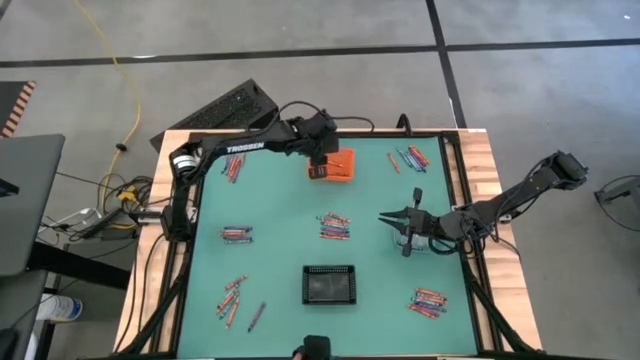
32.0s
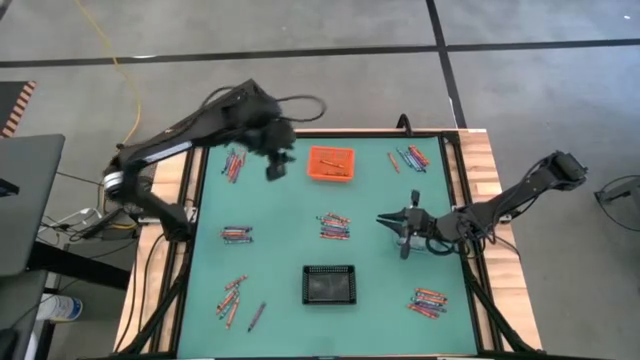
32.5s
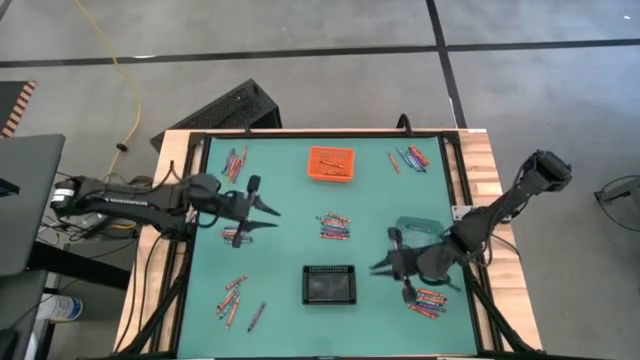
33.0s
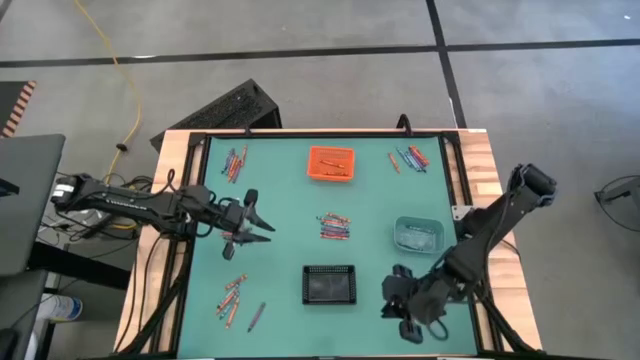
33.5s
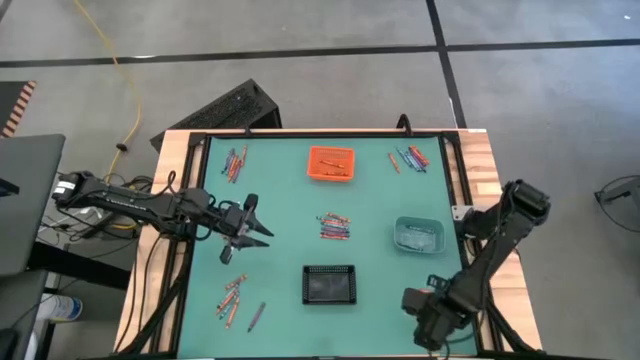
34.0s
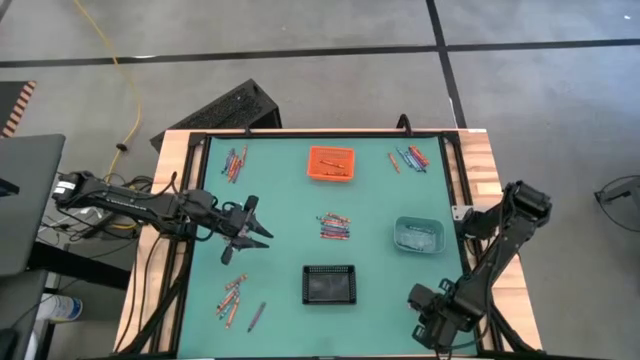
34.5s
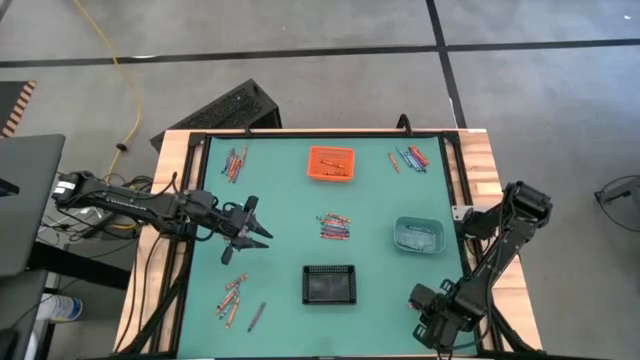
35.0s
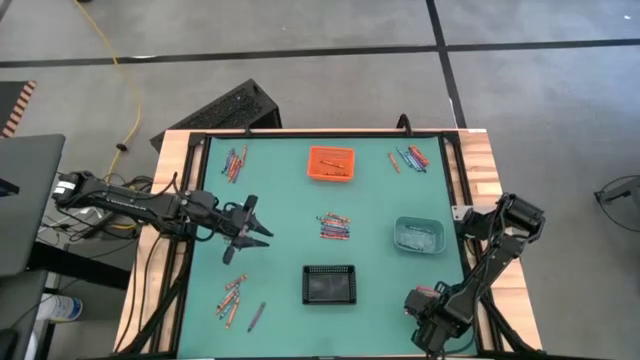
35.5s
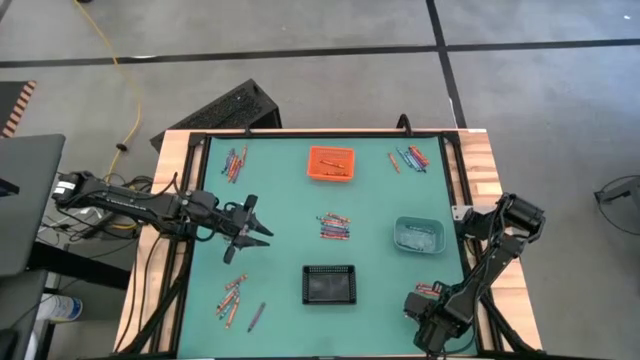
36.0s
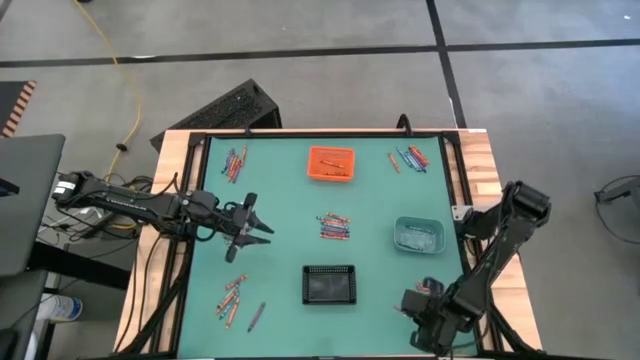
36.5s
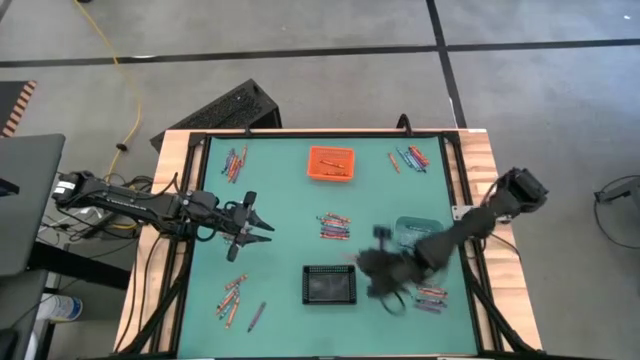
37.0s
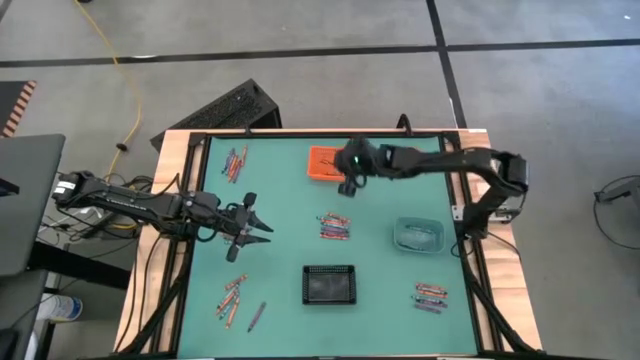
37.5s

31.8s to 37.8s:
Task: Sort crayons
Put the orange crayon into the orange bin

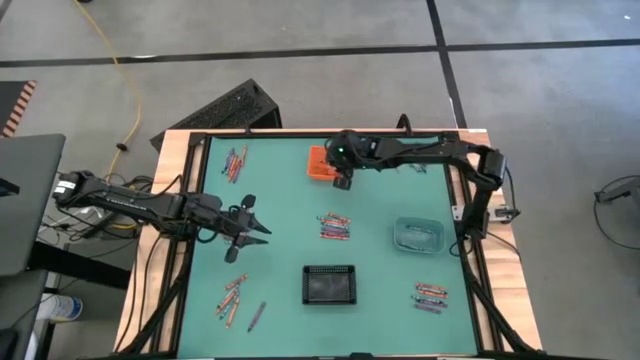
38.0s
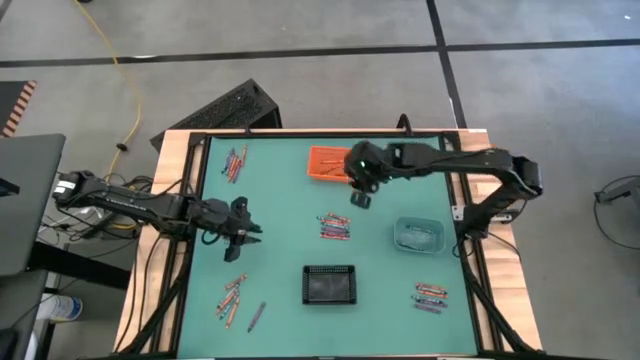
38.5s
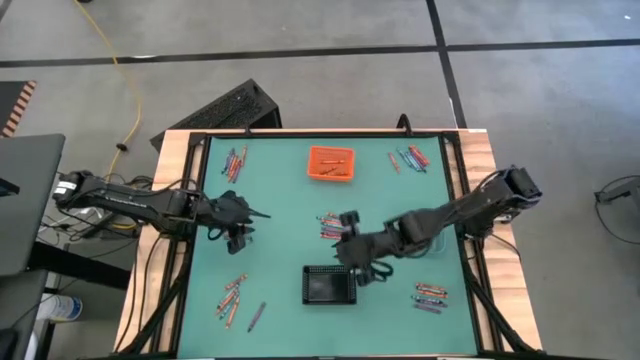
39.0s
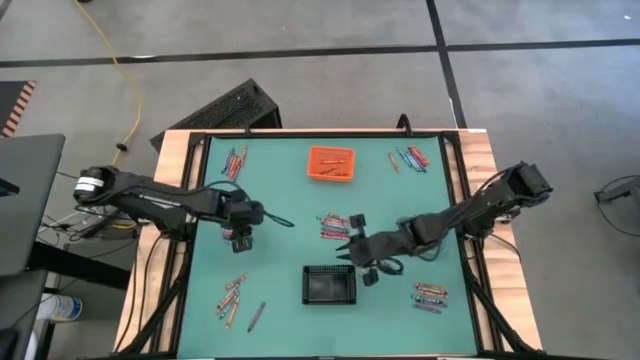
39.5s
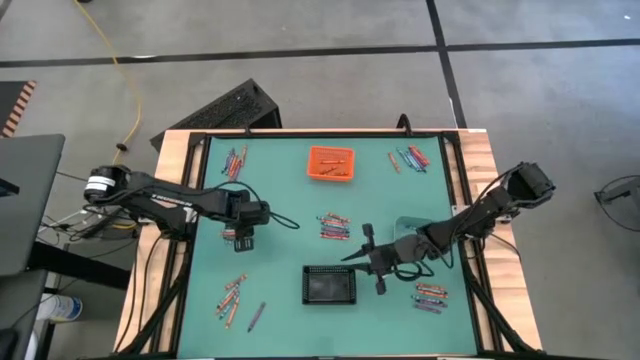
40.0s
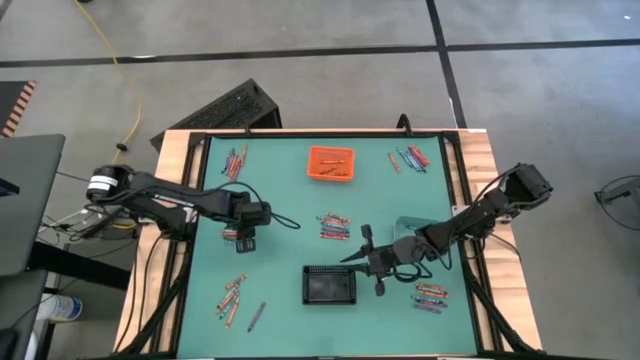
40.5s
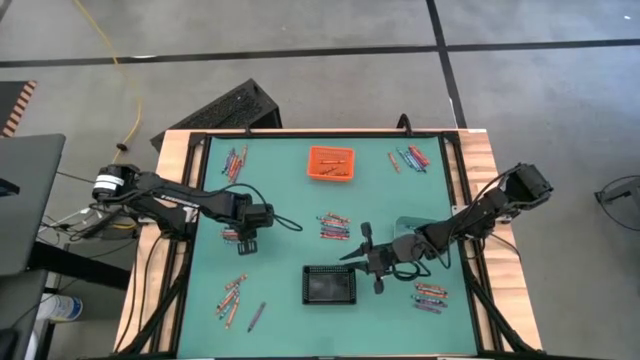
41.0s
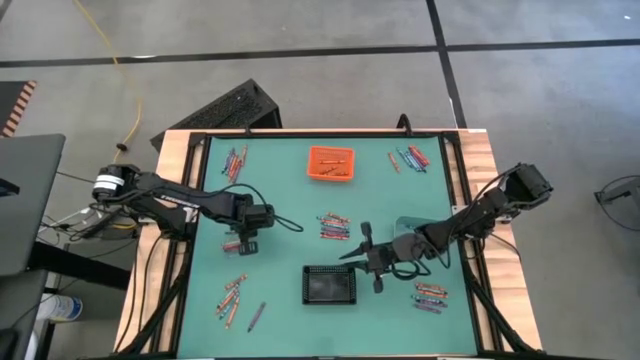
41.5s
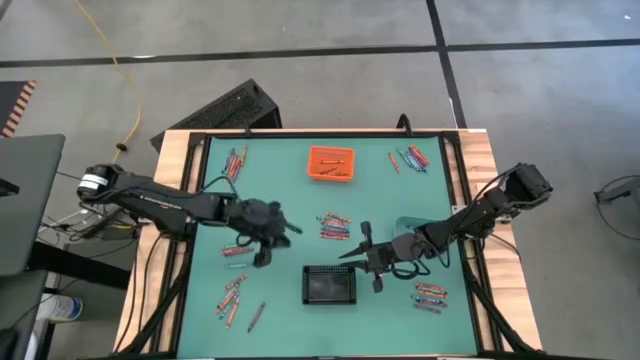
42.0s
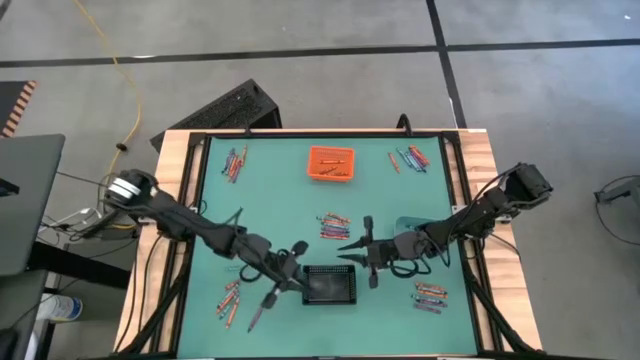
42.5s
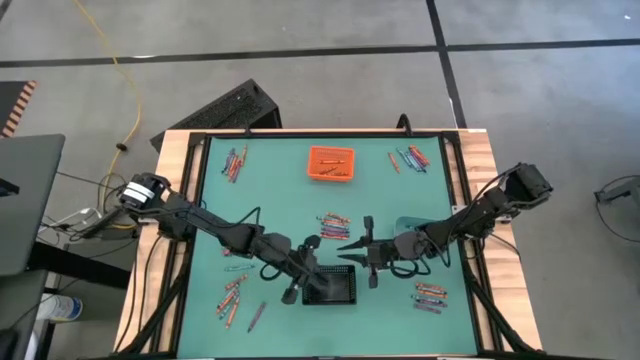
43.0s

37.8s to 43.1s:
Put the purple crayon into the black bin

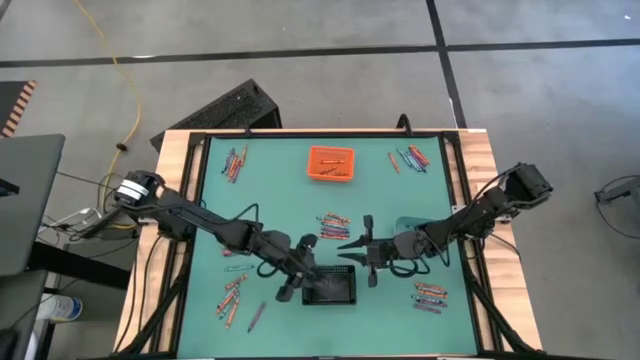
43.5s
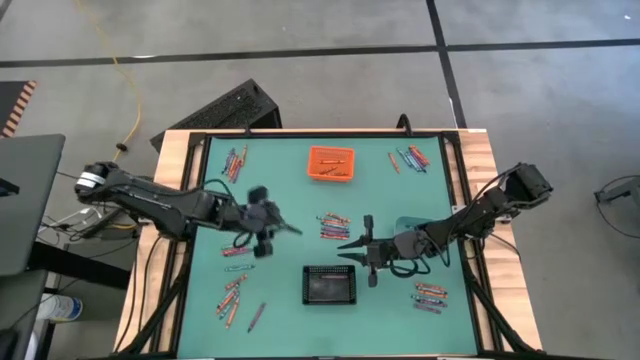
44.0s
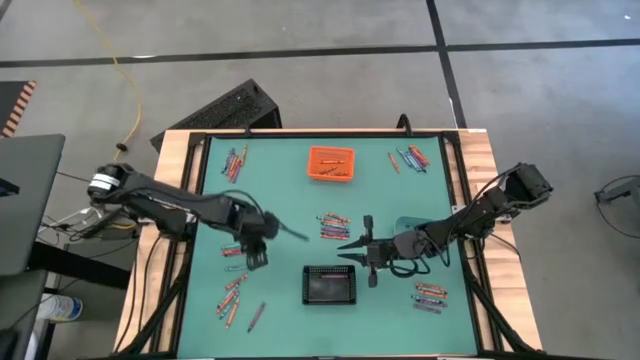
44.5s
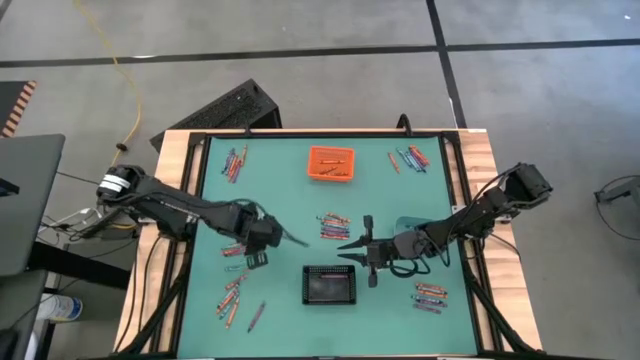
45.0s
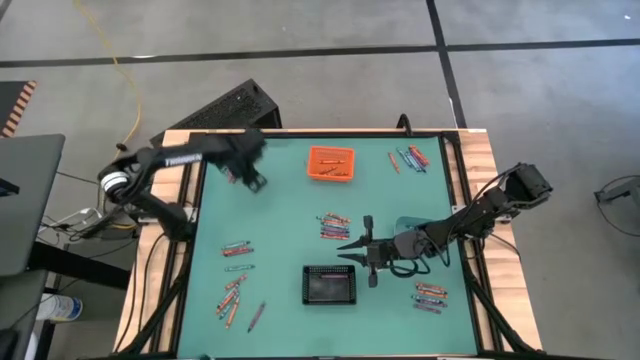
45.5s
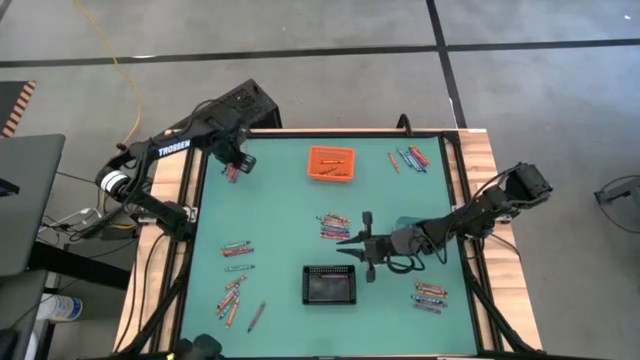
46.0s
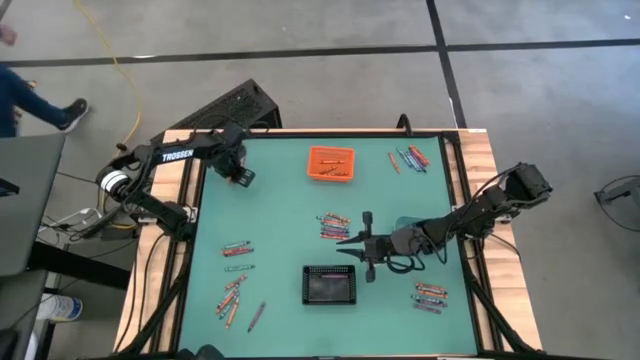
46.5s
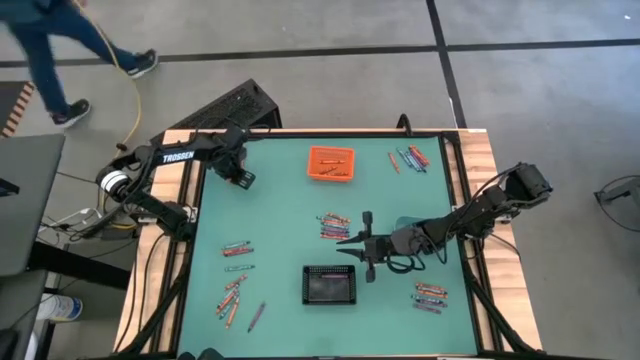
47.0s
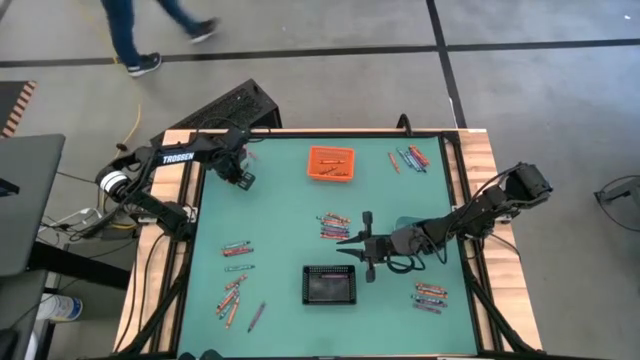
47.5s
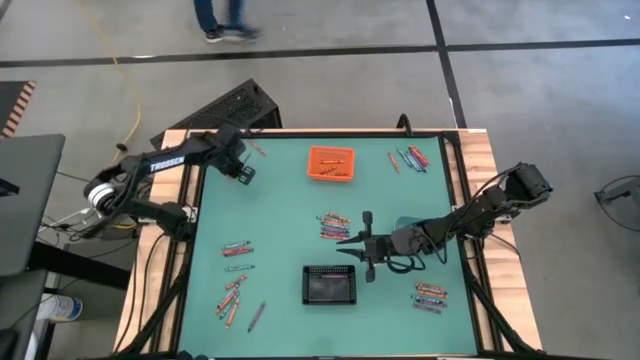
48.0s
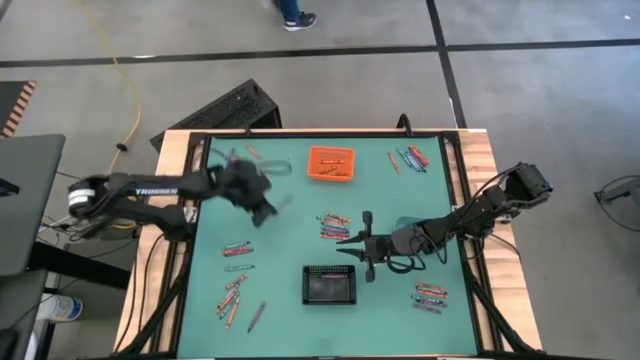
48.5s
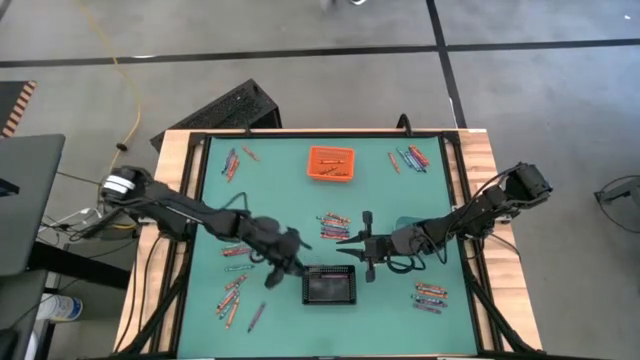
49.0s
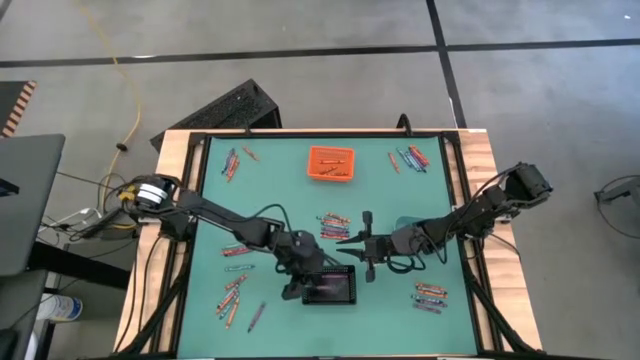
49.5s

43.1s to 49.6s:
Put the purple crayon into the black bin

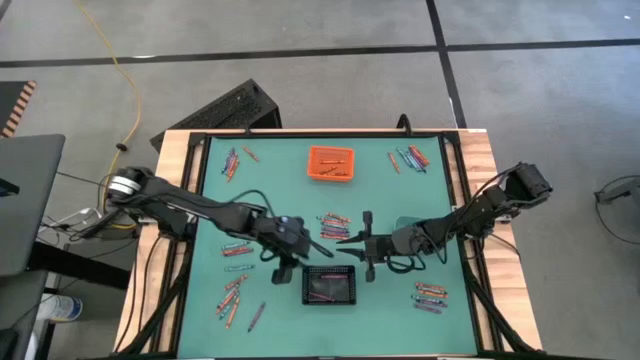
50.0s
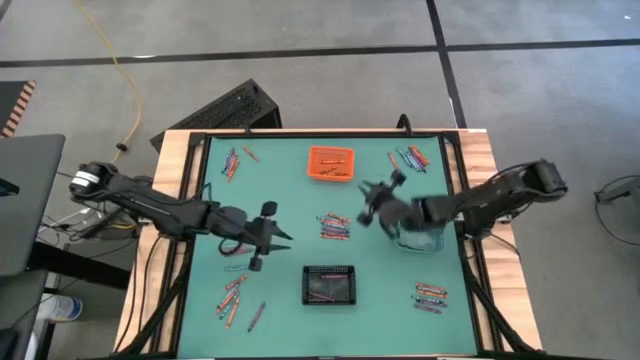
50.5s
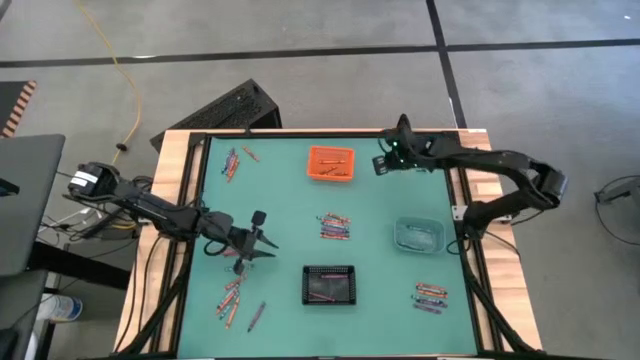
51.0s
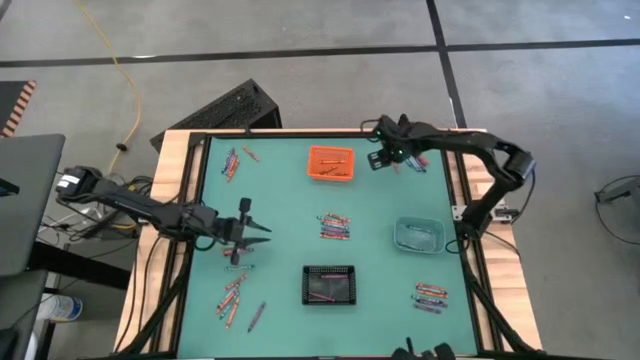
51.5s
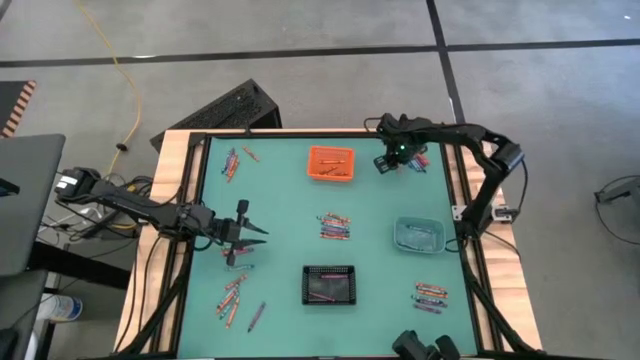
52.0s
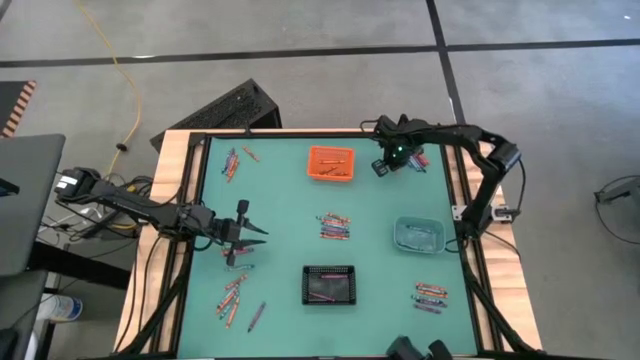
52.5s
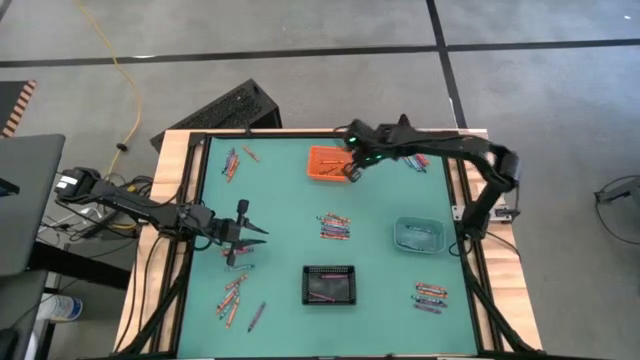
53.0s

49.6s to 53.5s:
Put the orange crayon into the orange bin
